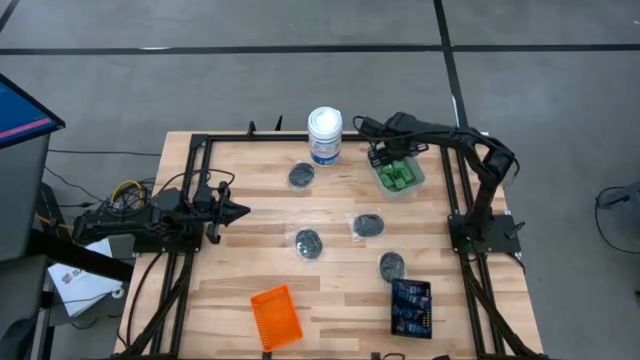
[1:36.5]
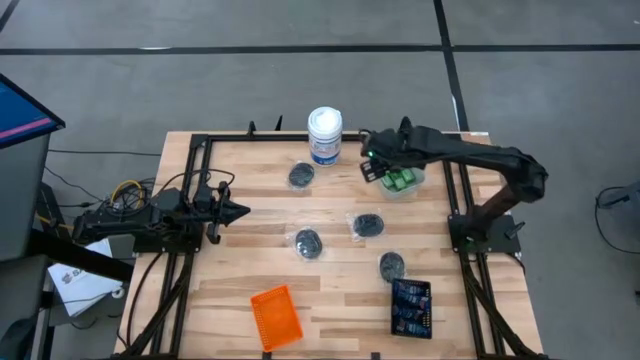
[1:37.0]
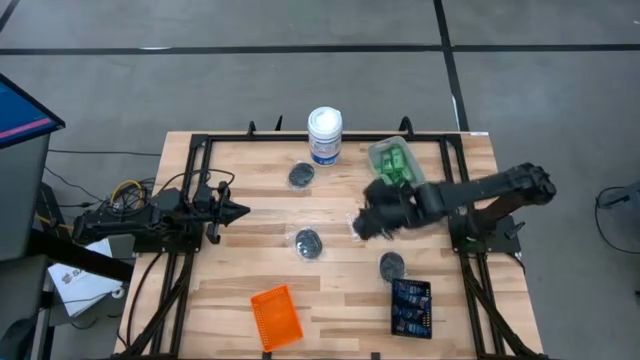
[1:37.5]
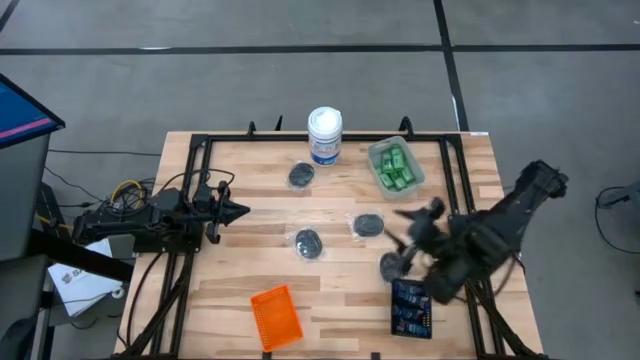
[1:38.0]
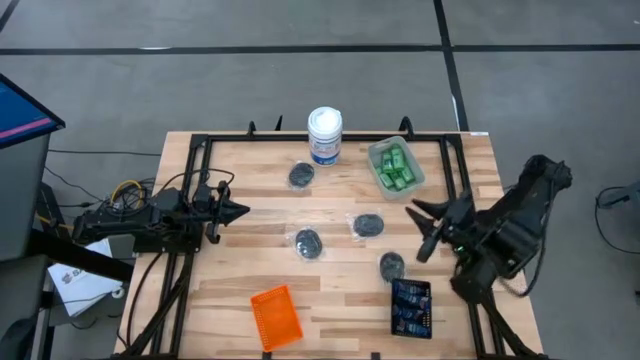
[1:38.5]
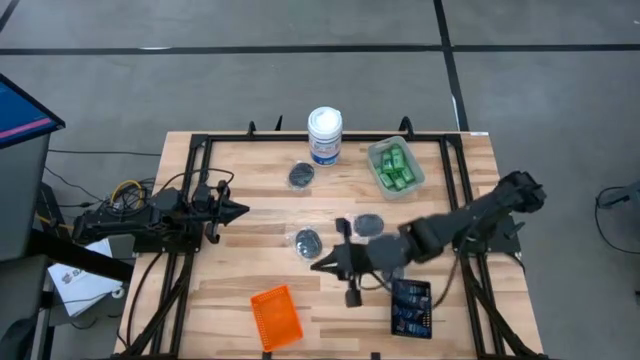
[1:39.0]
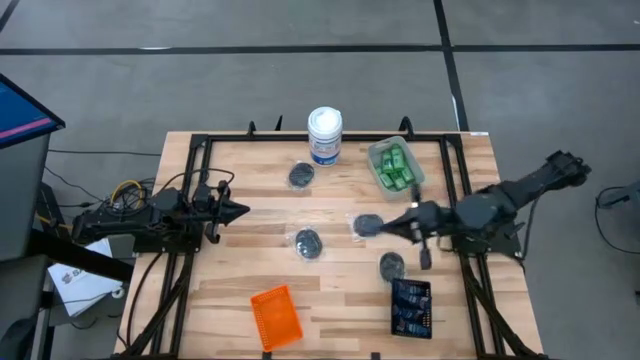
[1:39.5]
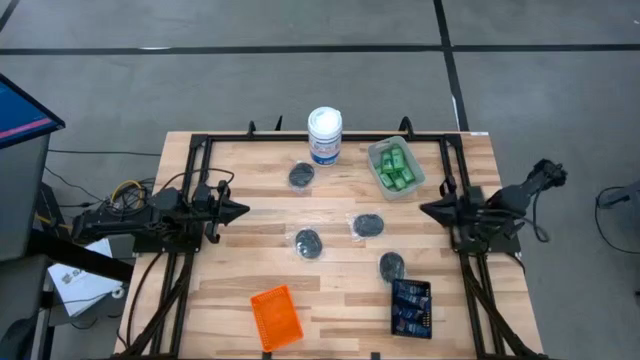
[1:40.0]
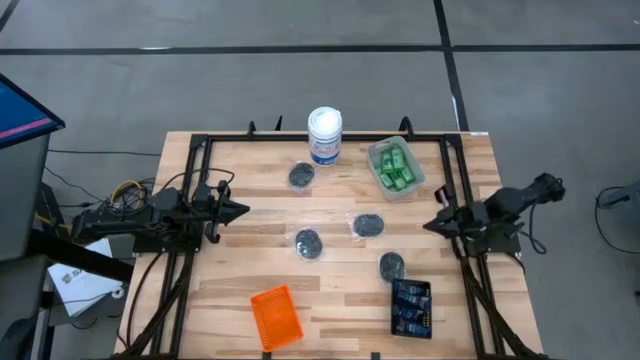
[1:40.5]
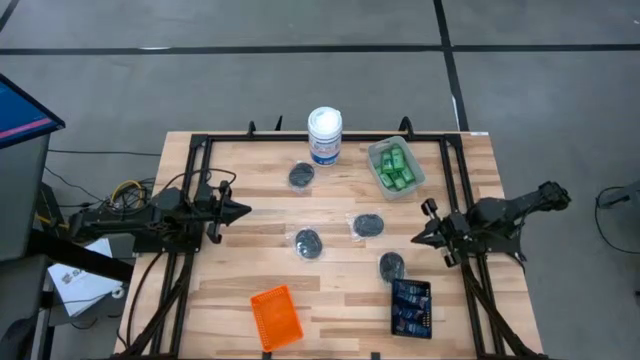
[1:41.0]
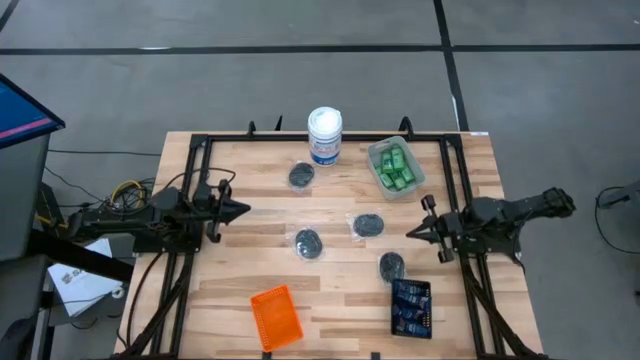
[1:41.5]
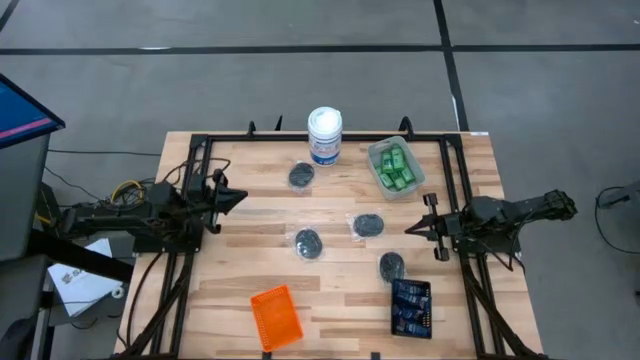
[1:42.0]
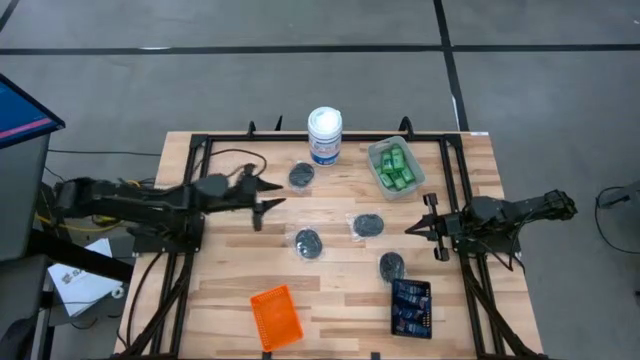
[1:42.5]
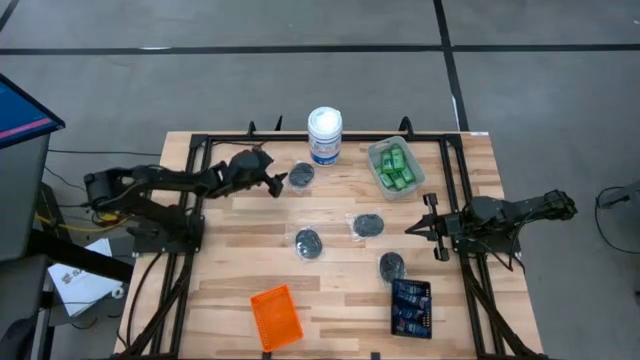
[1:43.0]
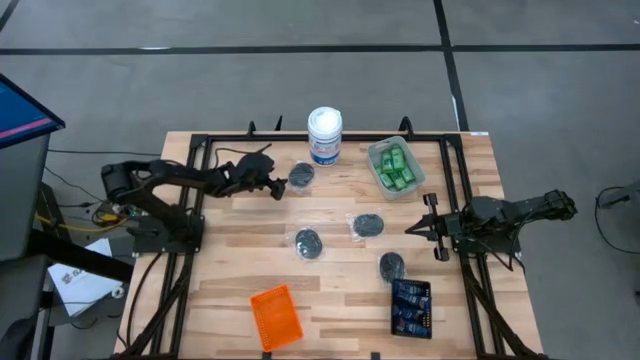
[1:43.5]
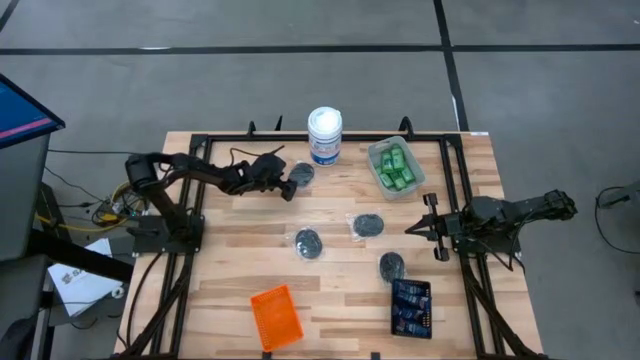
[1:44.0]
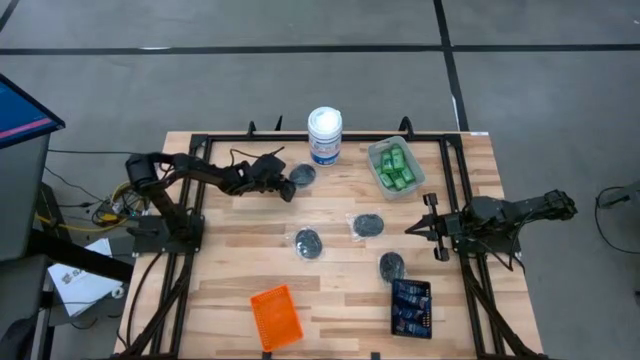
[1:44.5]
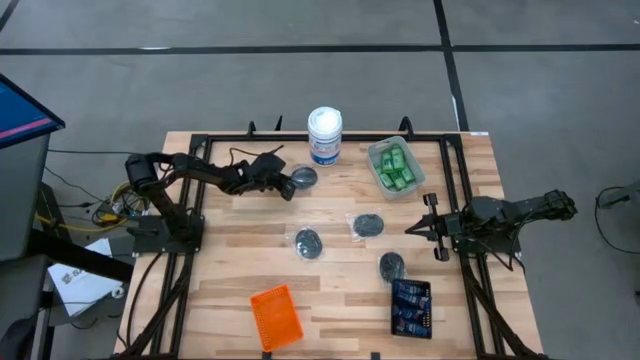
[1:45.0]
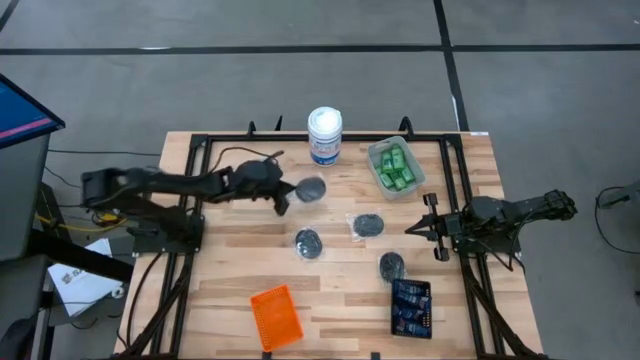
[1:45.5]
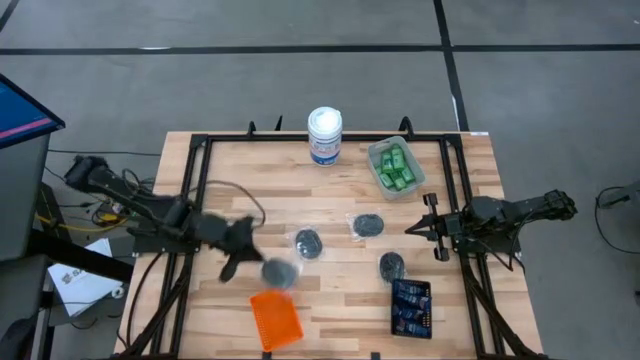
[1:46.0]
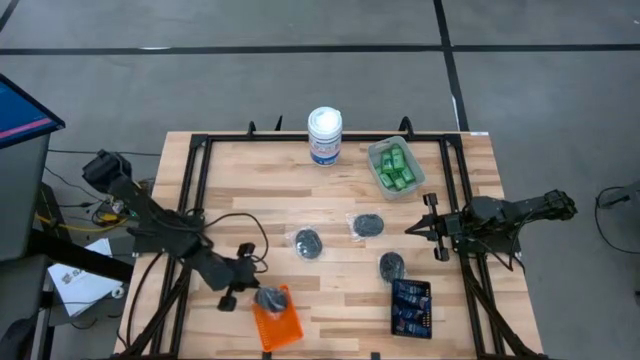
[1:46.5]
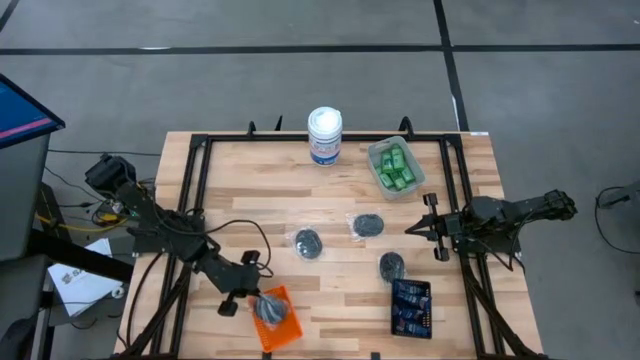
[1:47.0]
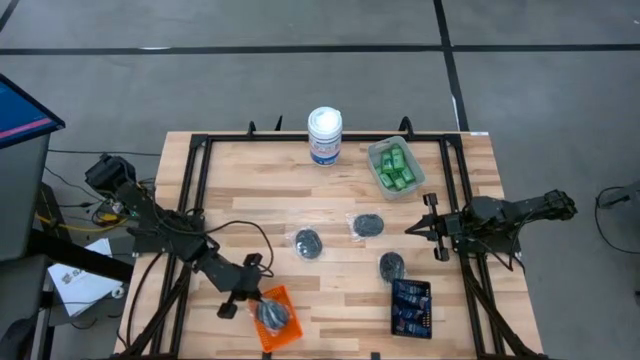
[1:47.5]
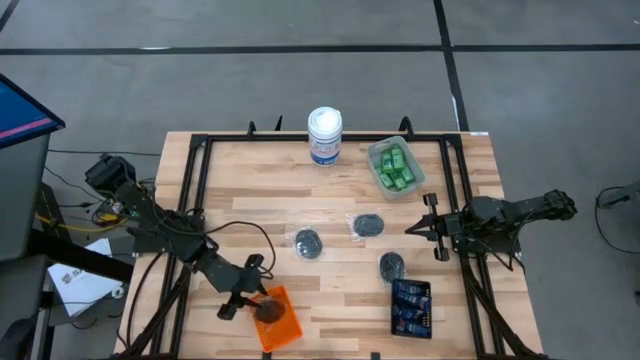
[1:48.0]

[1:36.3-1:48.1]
Task: Pick & Place Travel size toiletries
Put the black scrub pad into the orange basket

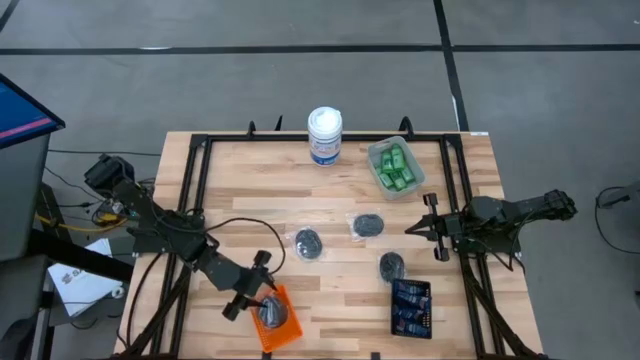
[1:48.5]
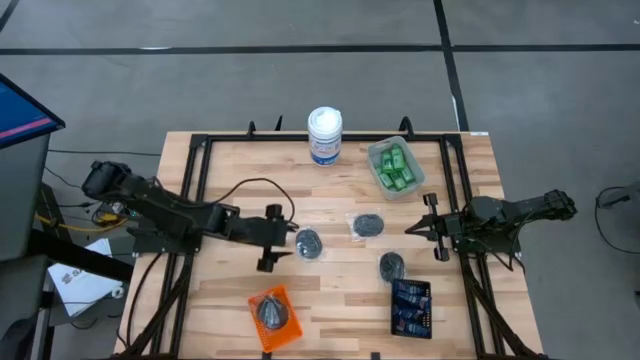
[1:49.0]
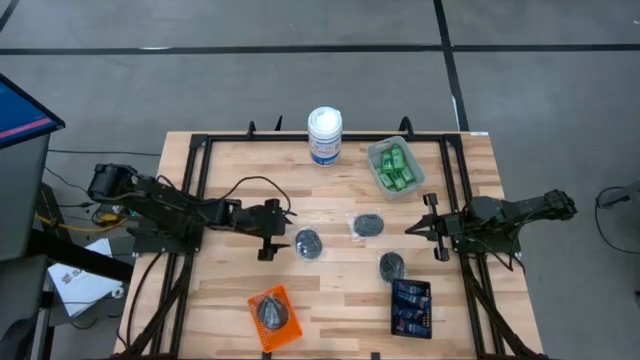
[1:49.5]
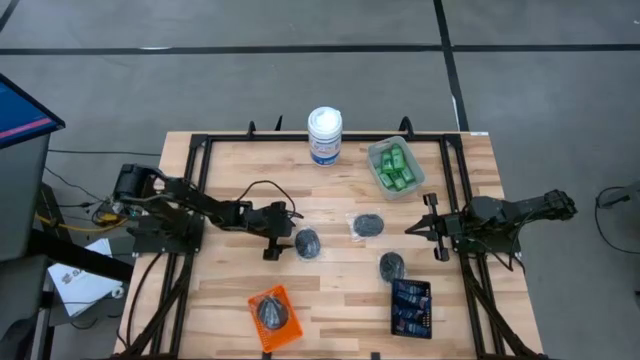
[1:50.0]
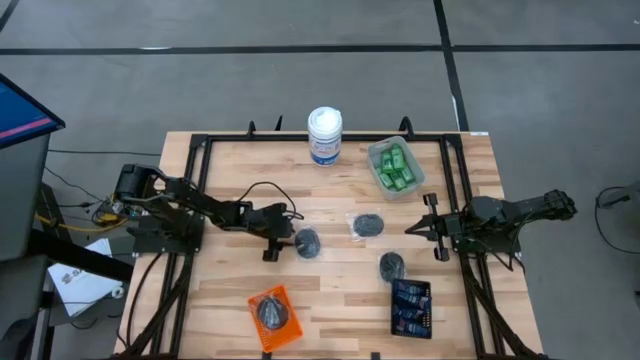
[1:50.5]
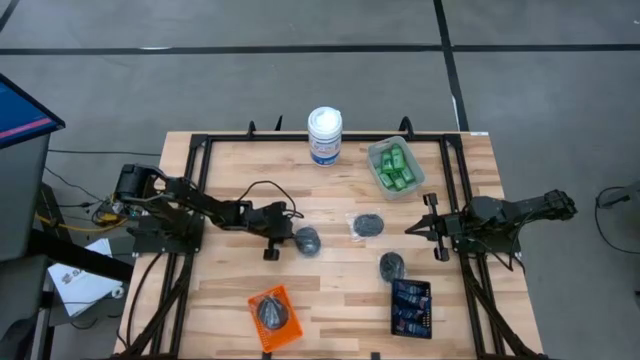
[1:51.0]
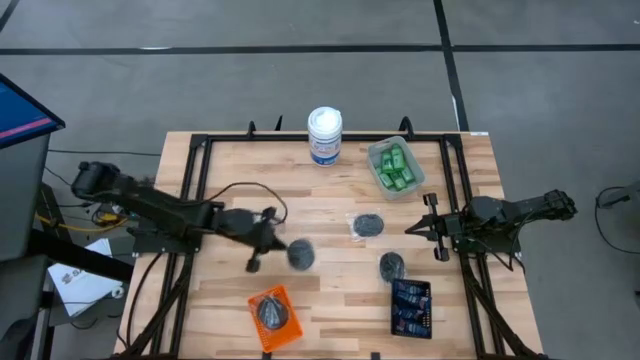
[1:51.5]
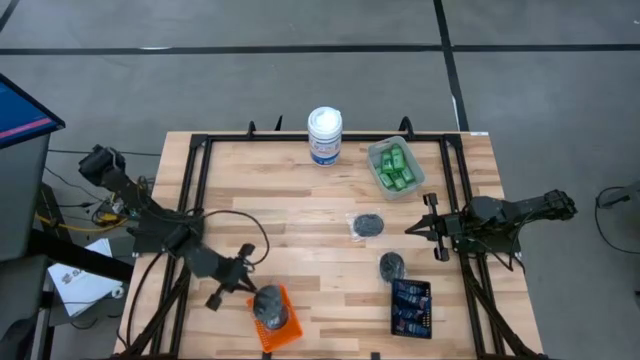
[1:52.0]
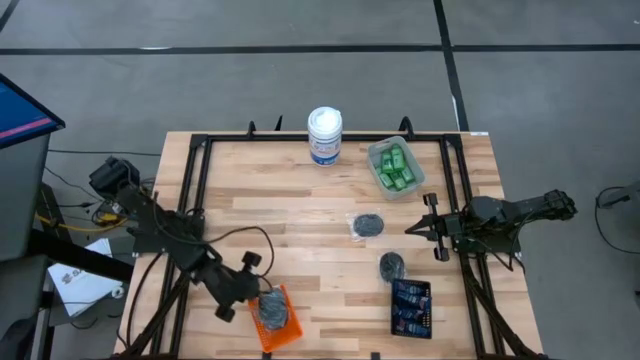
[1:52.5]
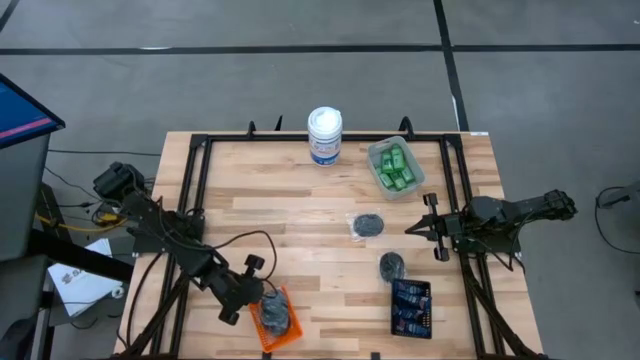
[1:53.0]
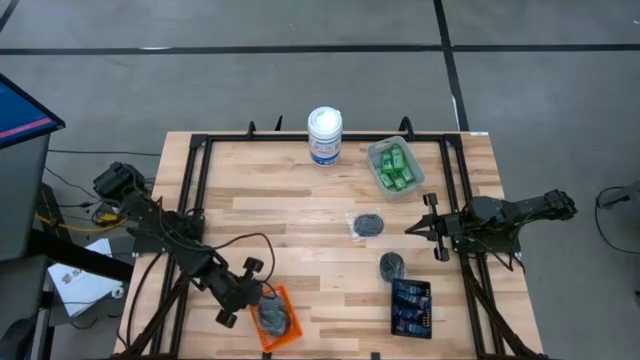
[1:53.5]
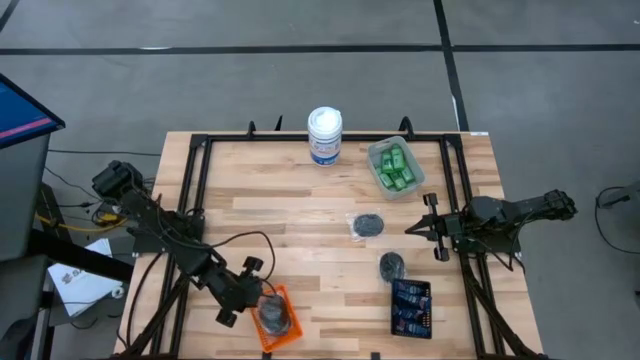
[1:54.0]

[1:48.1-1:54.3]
Put the black scrub pad into the orange basket

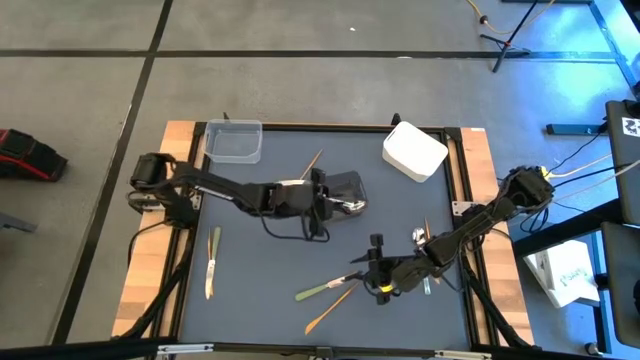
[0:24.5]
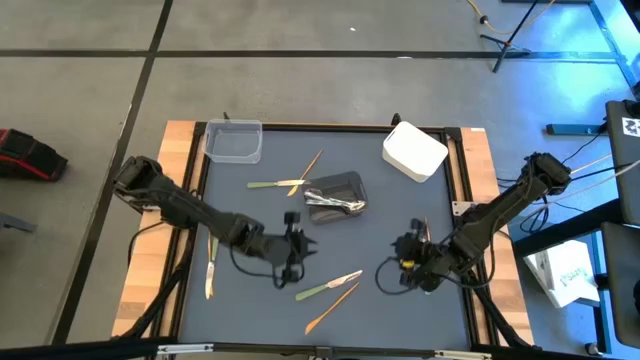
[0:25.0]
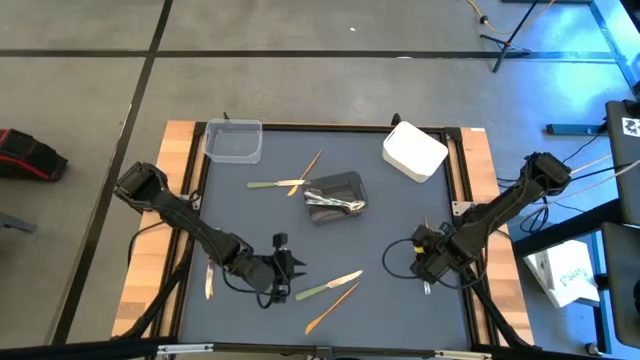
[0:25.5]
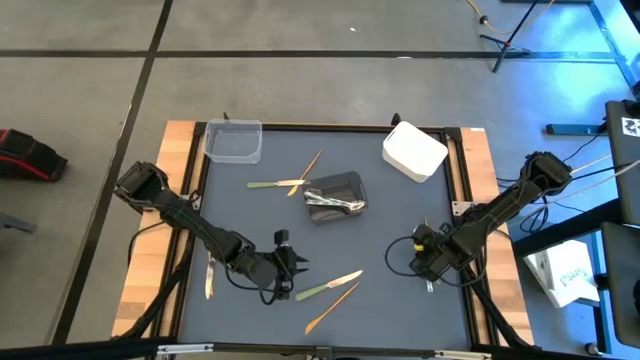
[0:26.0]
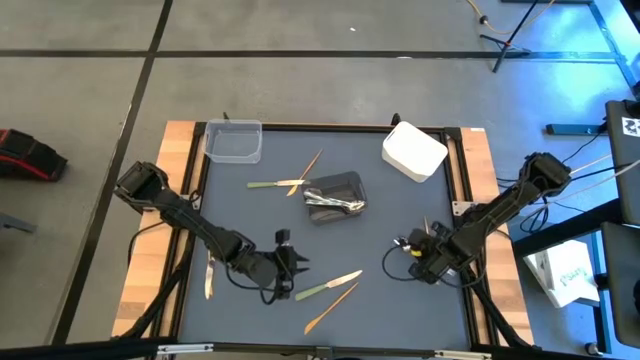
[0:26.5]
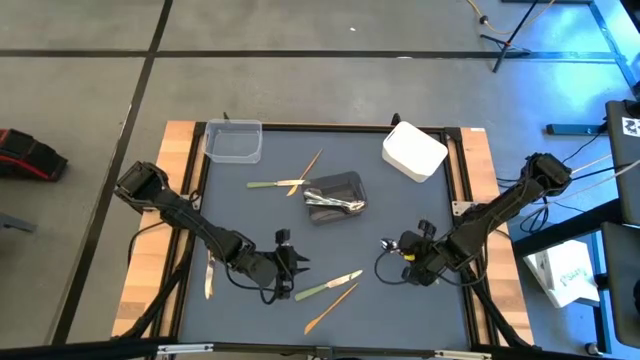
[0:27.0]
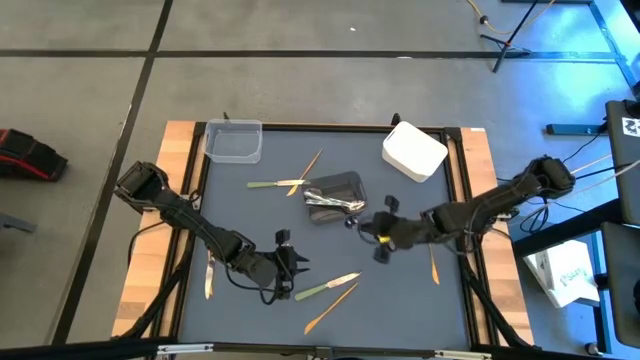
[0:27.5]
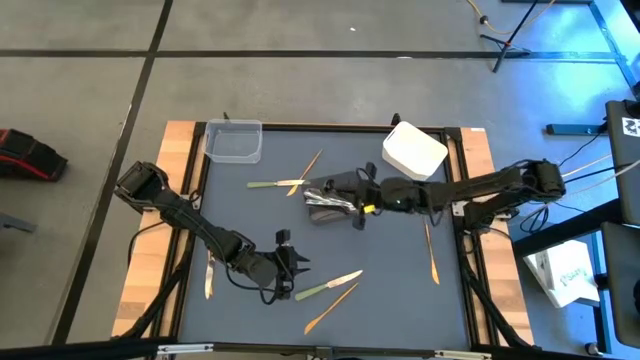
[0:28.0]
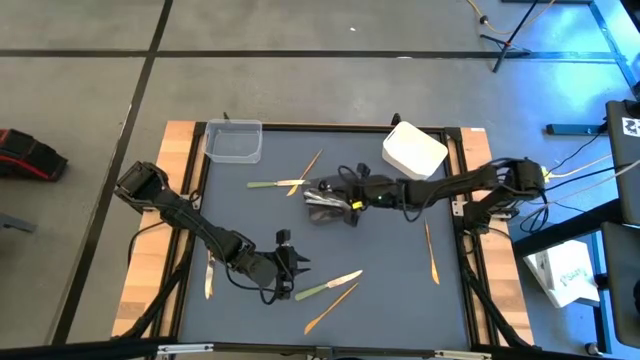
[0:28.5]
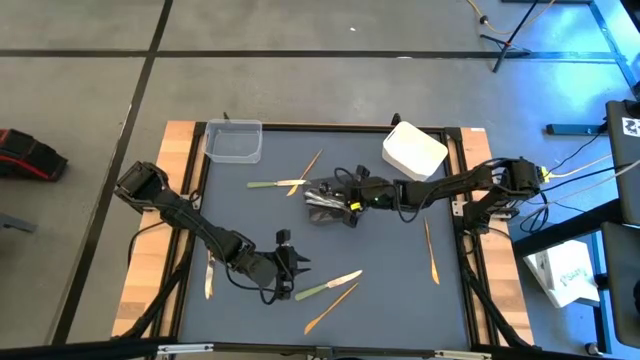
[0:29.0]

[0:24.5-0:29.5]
Task: Sort silverware by color (type)
Put the blue spoon into the black bin
